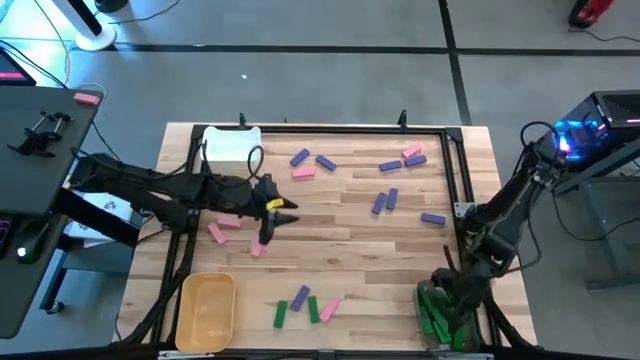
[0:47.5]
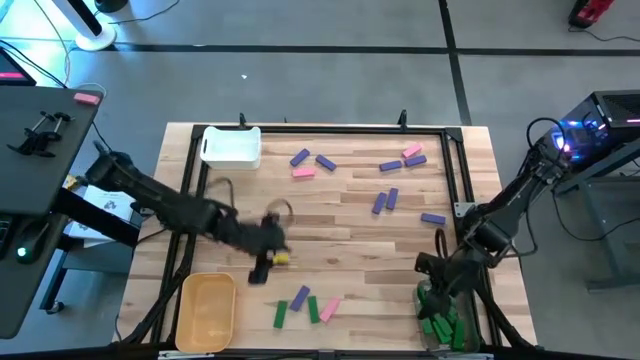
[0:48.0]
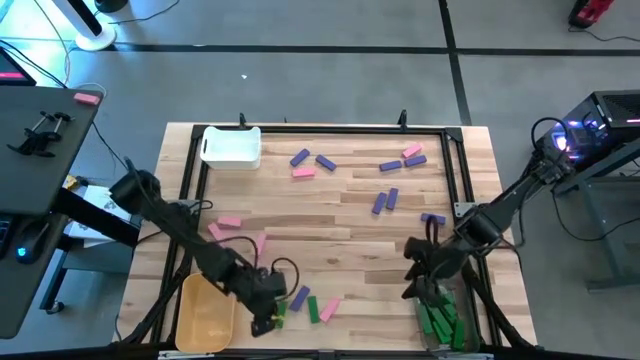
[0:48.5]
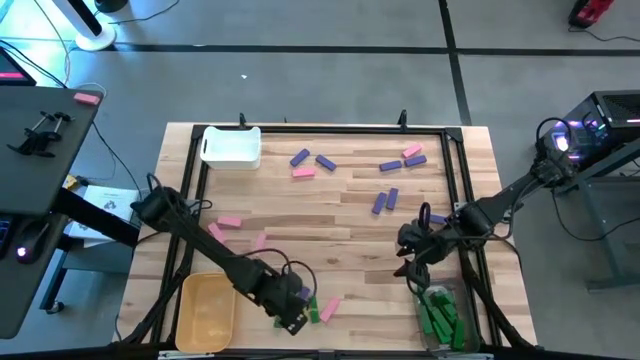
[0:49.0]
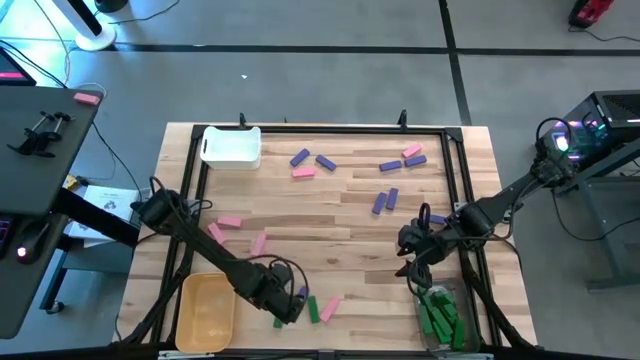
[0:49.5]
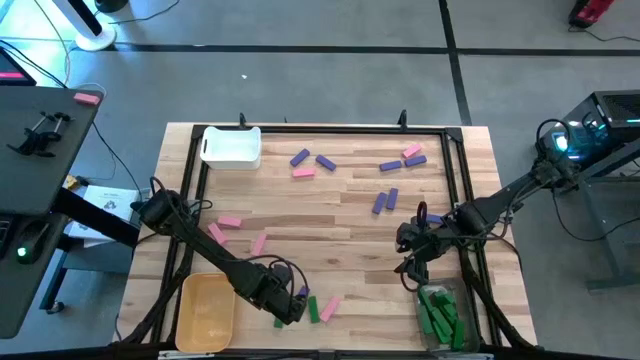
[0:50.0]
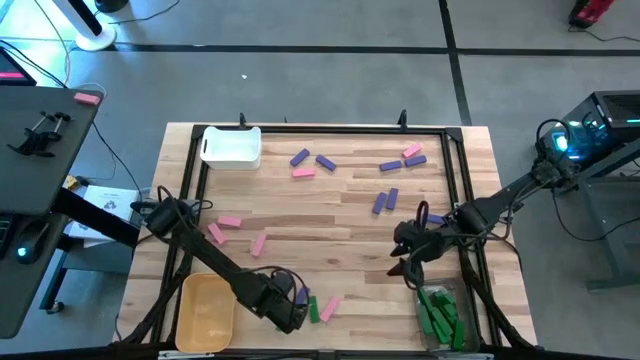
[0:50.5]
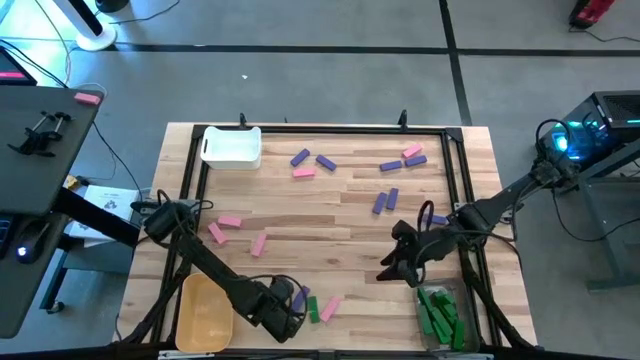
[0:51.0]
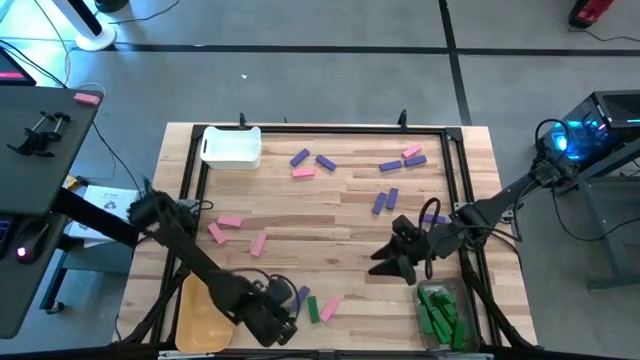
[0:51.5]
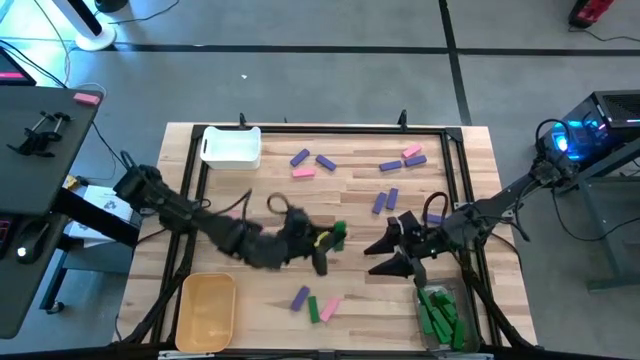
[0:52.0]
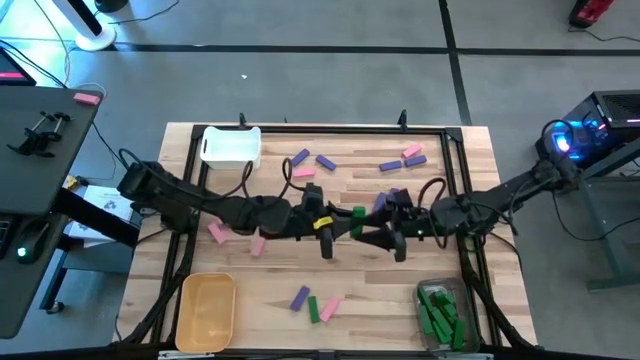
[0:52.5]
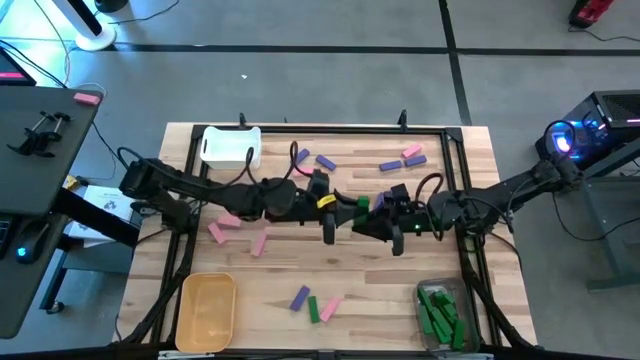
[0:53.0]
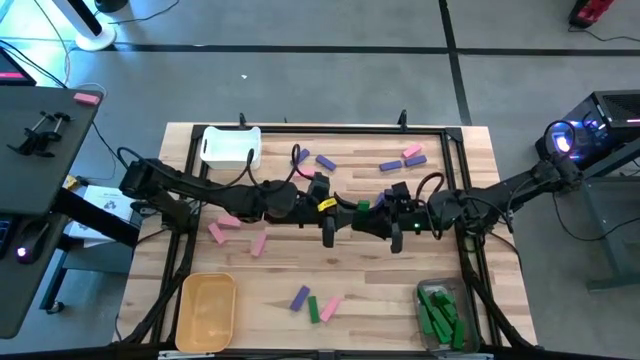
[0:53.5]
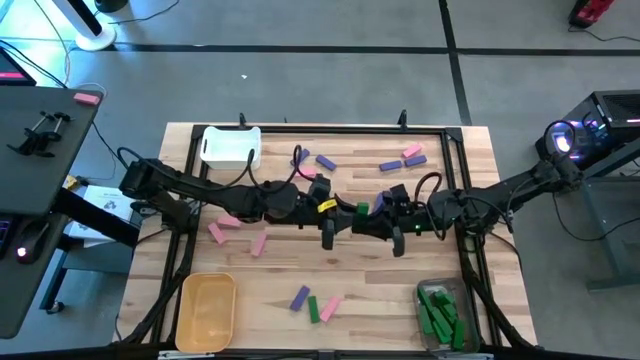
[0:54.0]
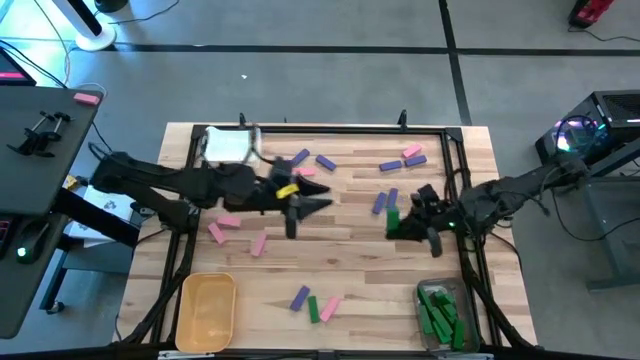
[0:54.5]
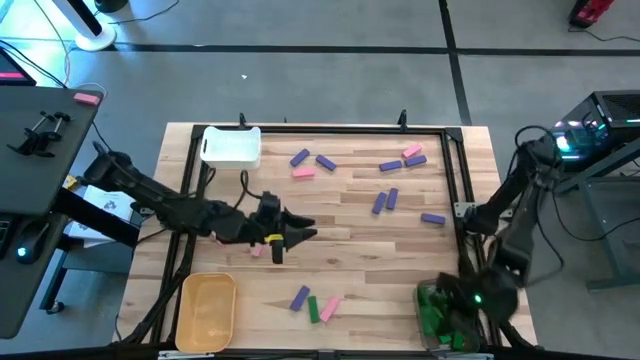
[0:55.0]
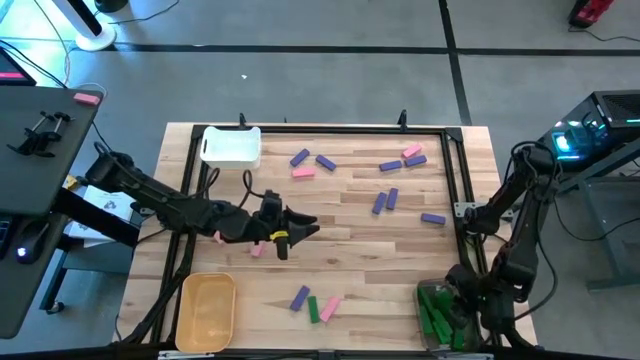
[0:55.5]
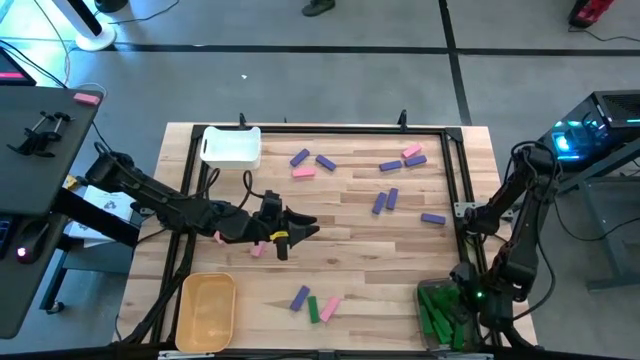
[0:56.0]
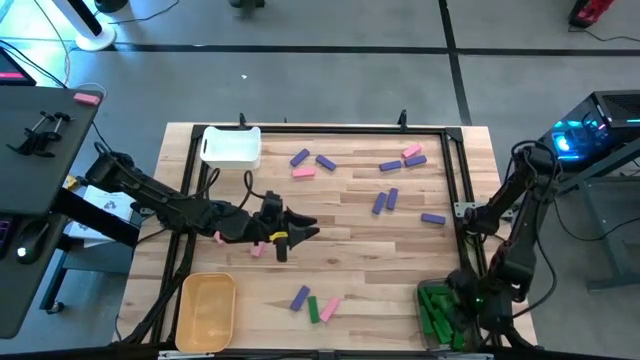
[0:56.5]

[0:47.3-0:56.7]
Task: Sort blocks
Put the green wooden block into the black bin

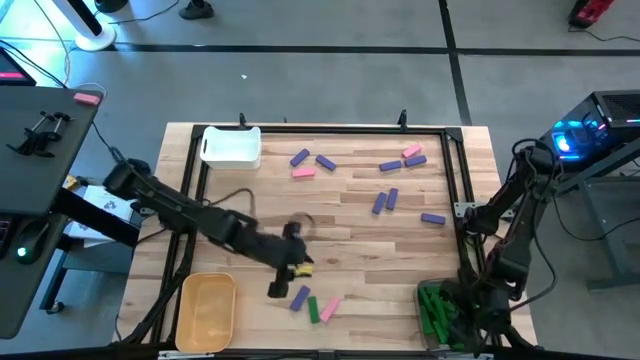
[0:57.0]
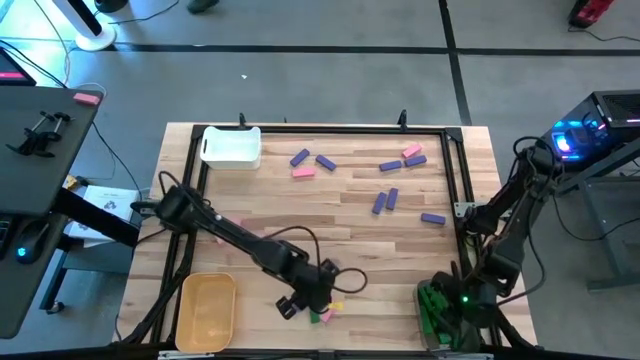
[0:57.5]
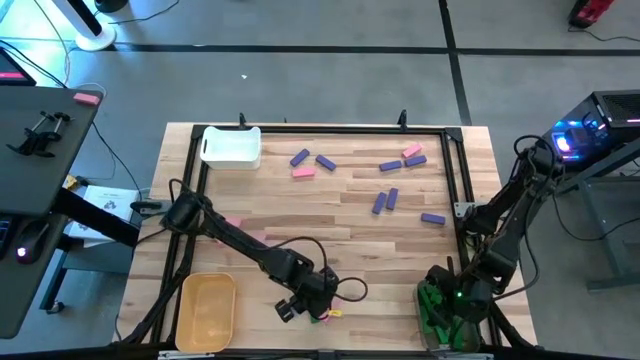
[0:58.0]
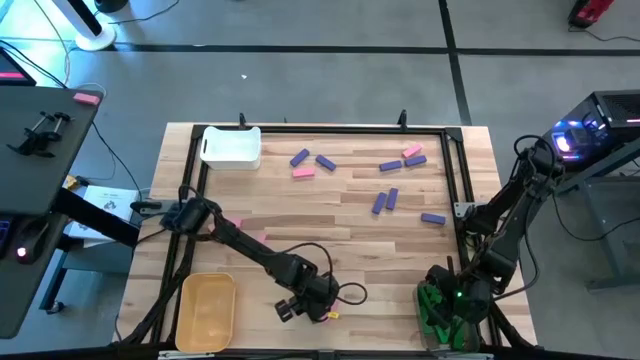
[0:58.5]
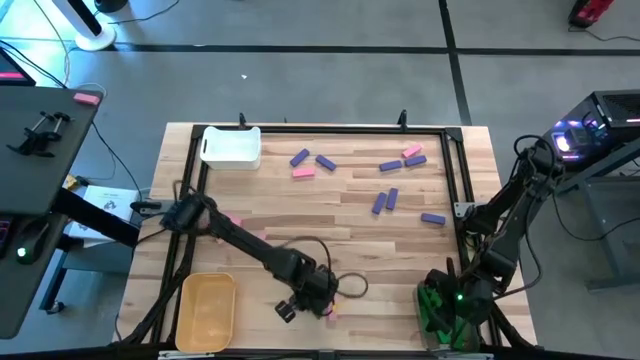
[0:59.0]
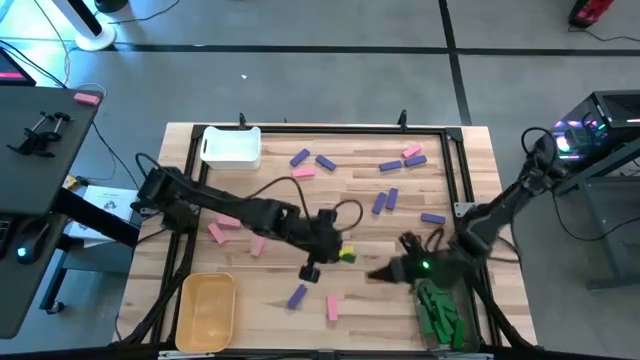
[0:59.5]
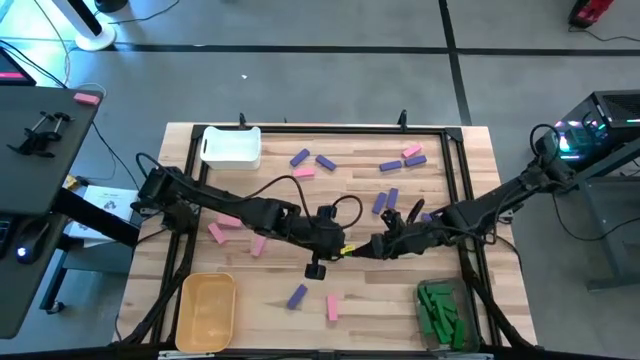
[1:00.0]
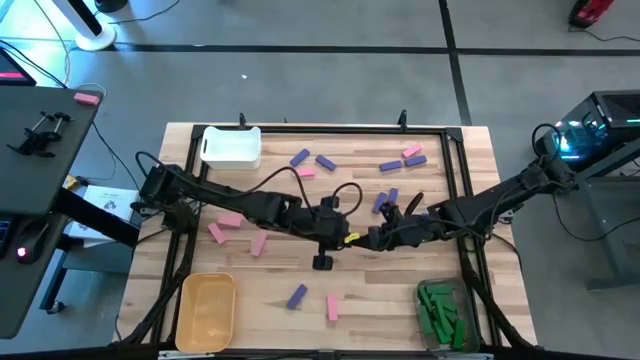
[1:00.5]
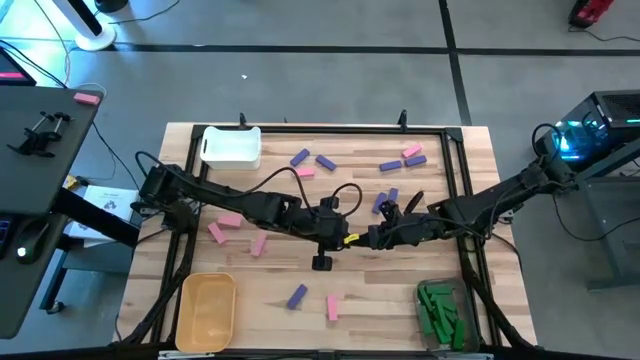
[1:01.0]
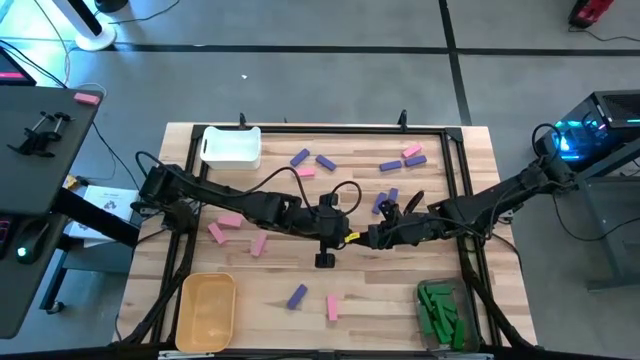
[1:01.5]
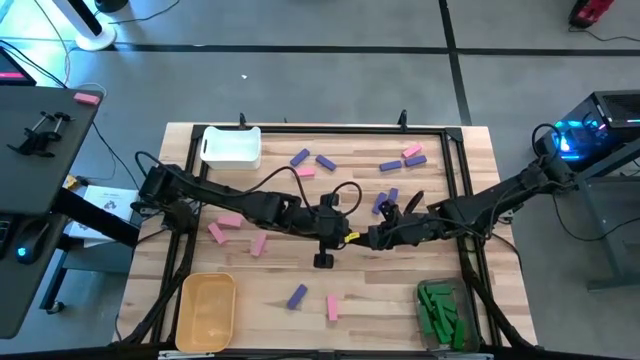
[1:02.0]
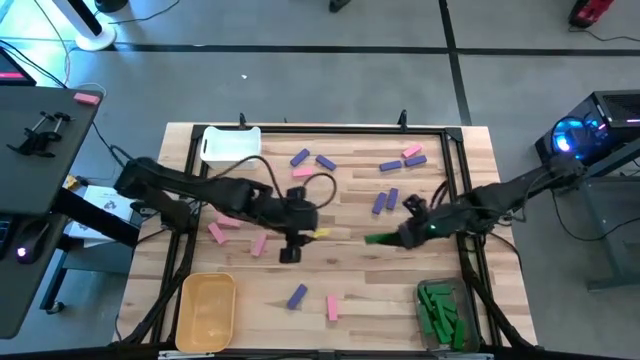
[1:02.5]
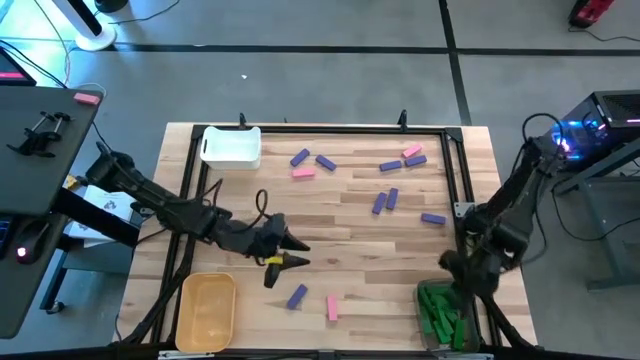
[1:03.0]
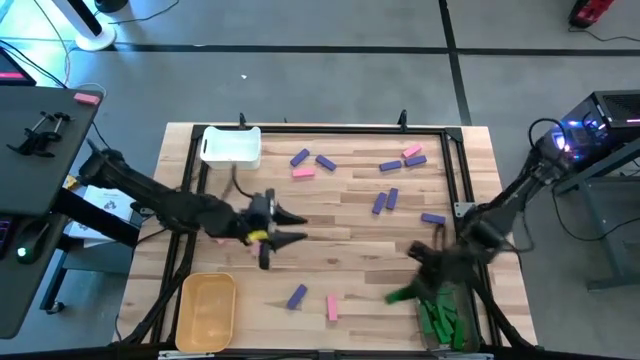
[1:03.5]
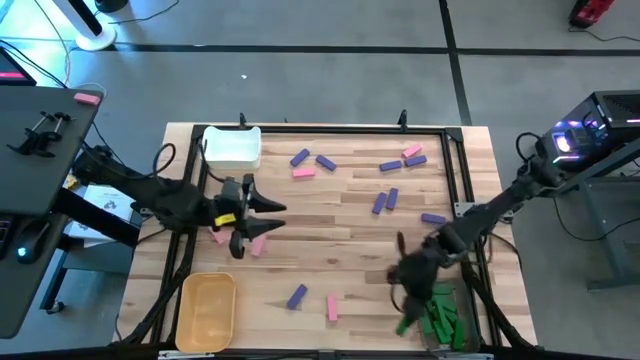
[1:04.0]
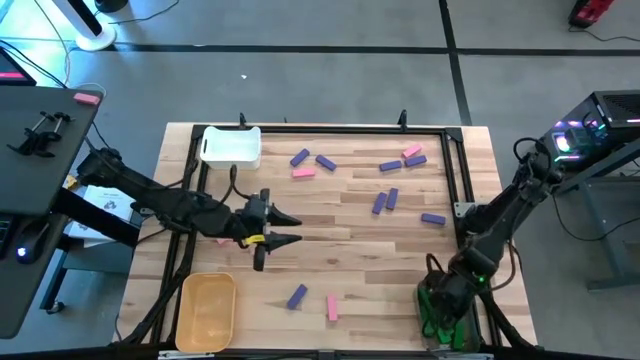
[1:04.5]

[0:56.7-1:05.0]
Put the green wooden block into the black bin

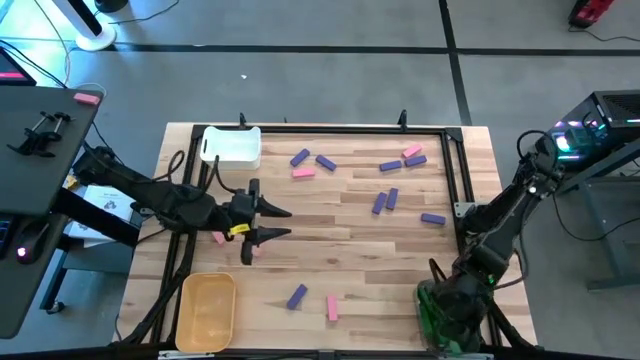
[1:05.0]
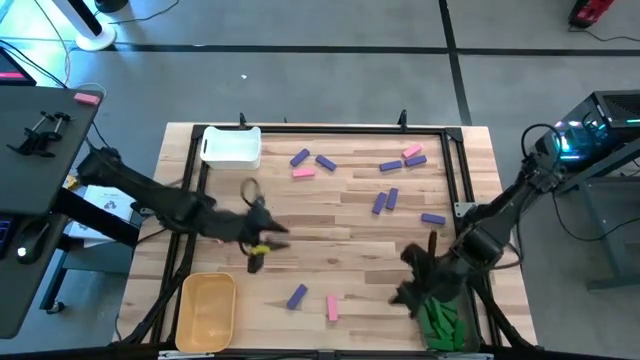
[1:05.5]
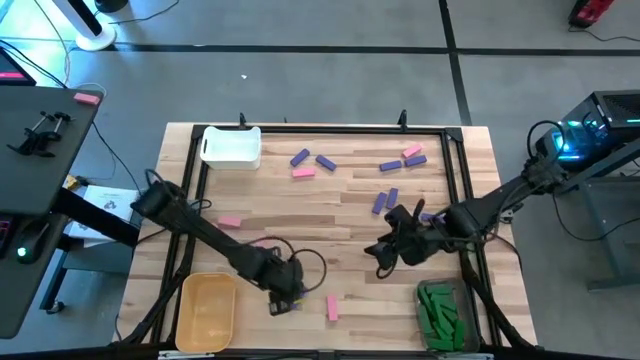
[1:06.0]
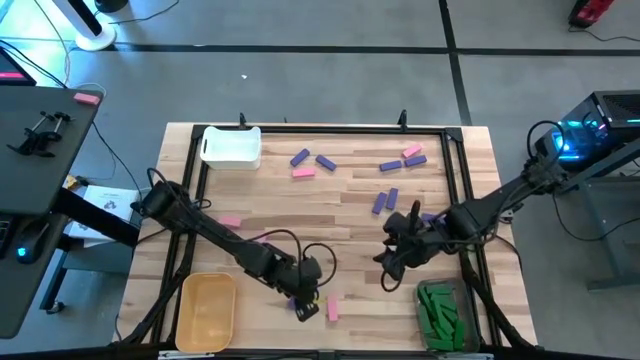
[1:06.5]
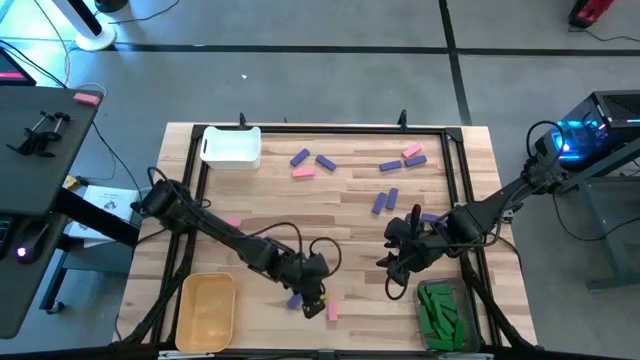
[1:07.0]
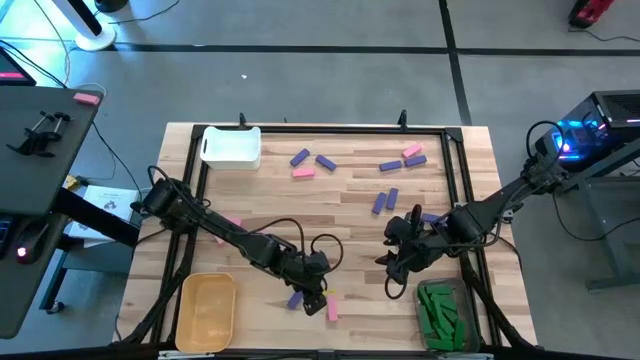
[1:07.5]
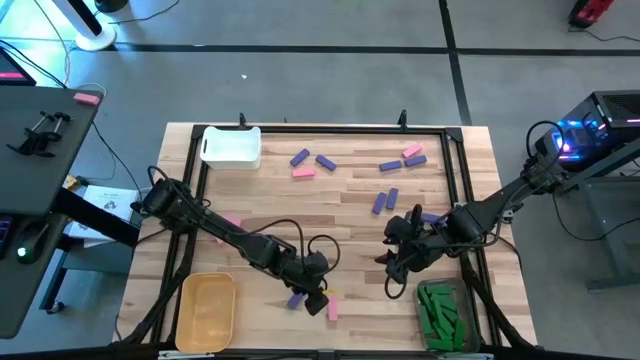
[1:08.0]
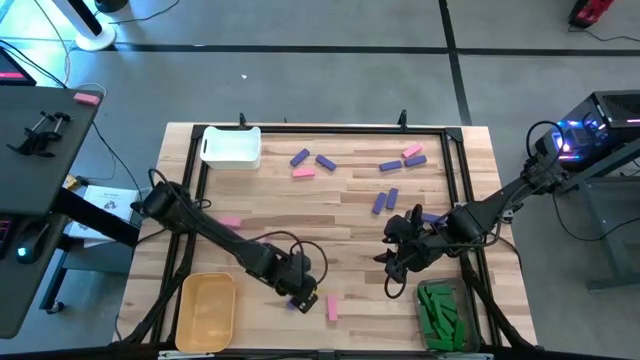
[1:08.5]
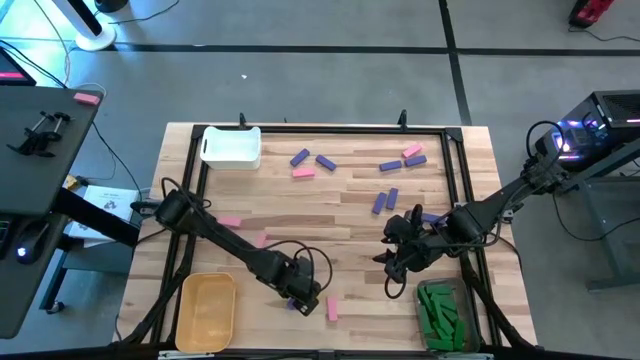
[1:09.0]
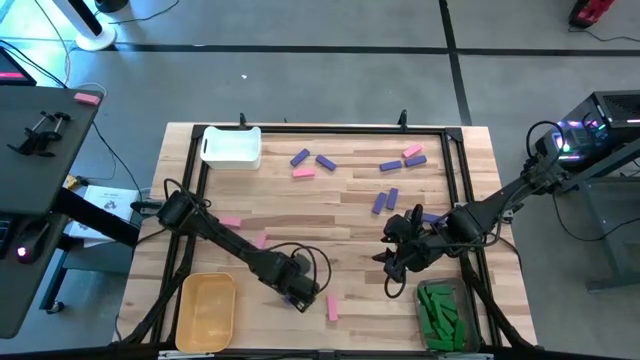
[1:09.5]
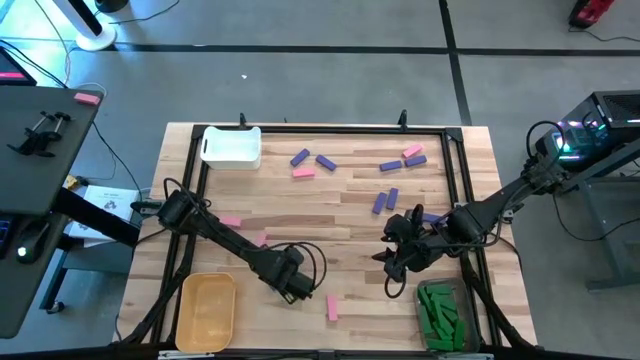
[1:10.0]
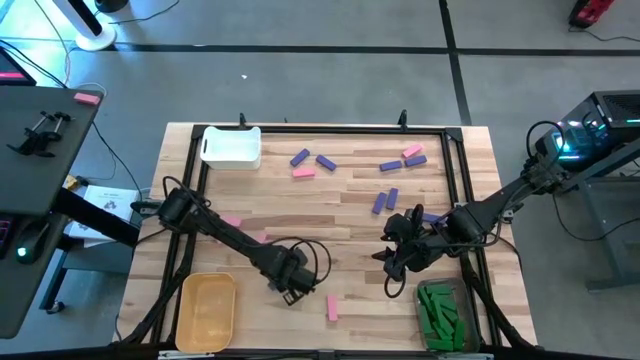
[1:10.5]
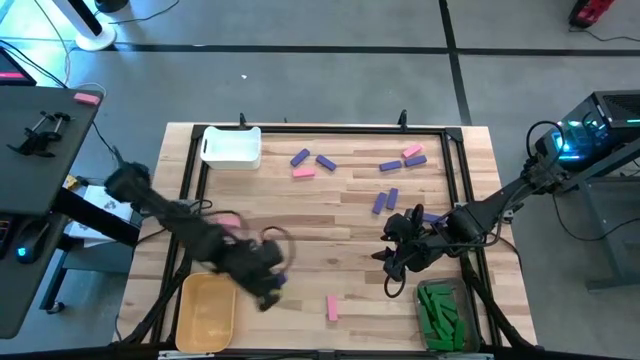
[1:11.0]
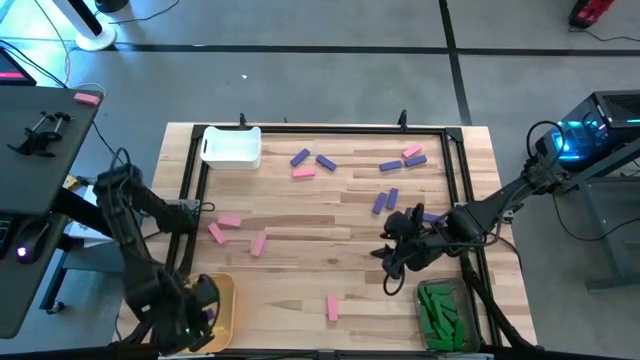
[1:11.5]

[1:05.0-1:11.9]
Put the blue wooden block into the yellow bin
